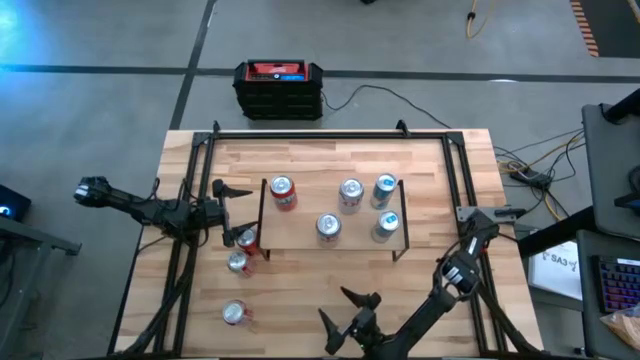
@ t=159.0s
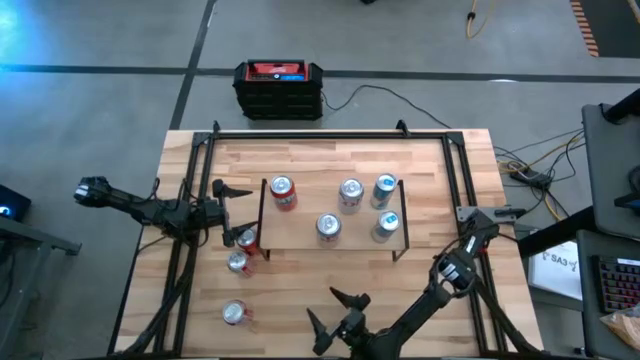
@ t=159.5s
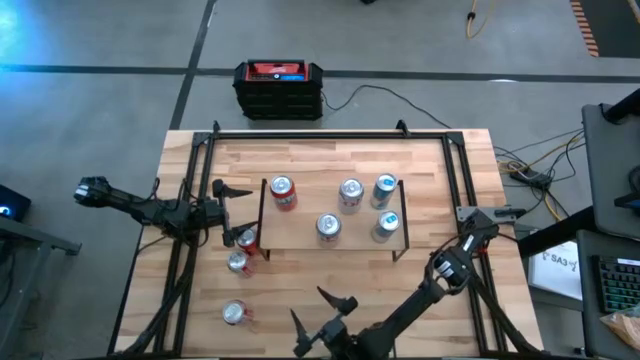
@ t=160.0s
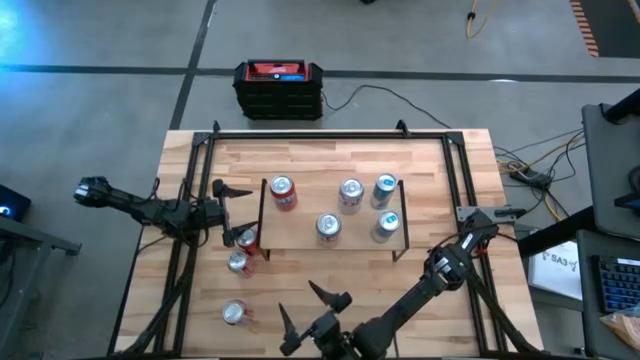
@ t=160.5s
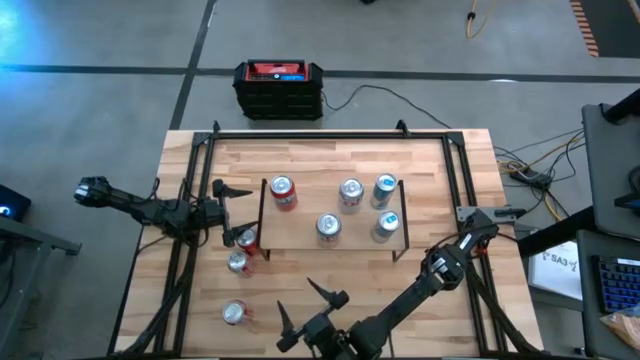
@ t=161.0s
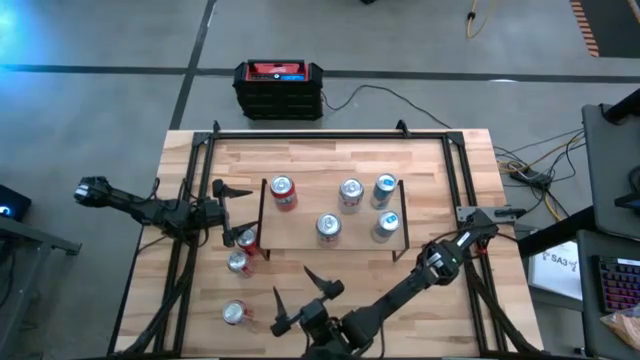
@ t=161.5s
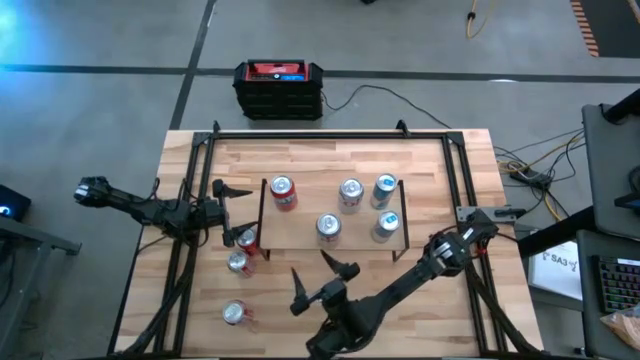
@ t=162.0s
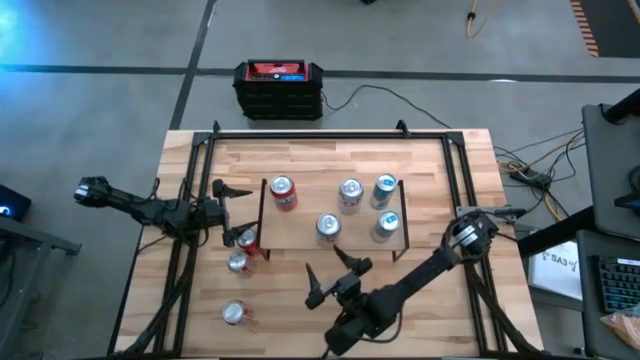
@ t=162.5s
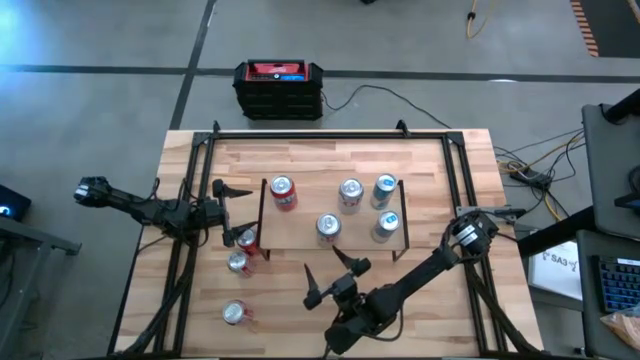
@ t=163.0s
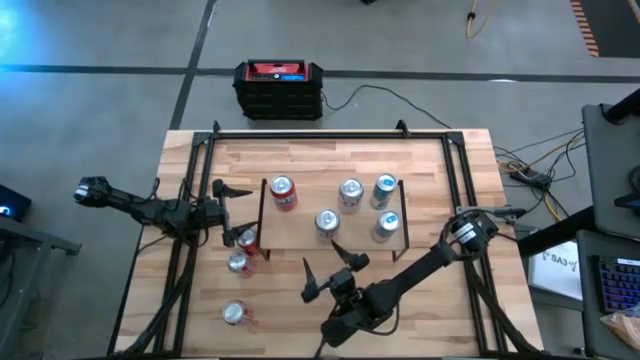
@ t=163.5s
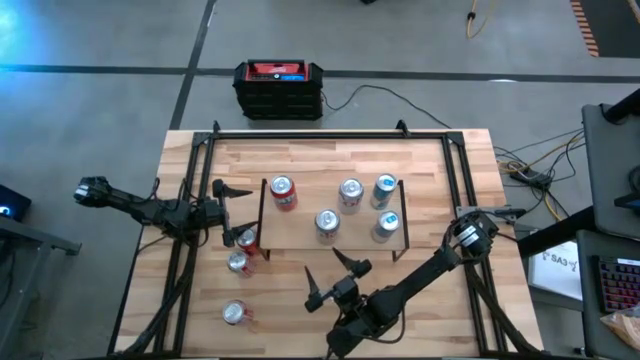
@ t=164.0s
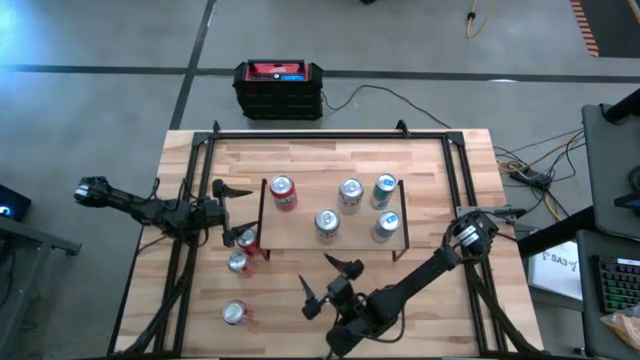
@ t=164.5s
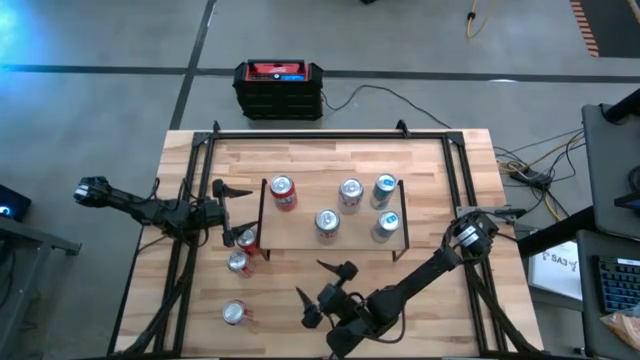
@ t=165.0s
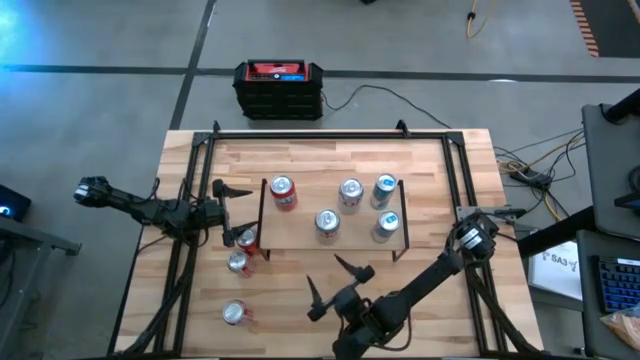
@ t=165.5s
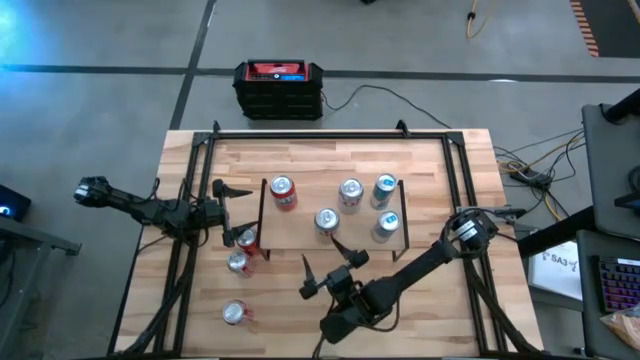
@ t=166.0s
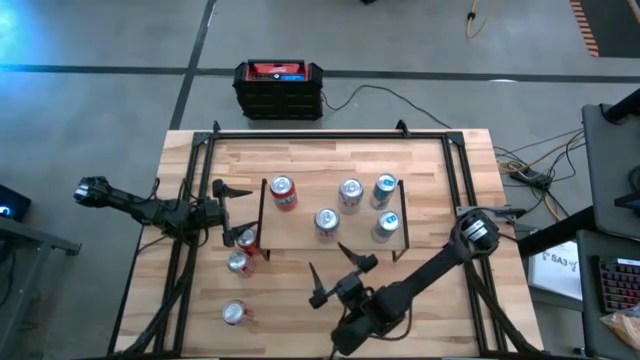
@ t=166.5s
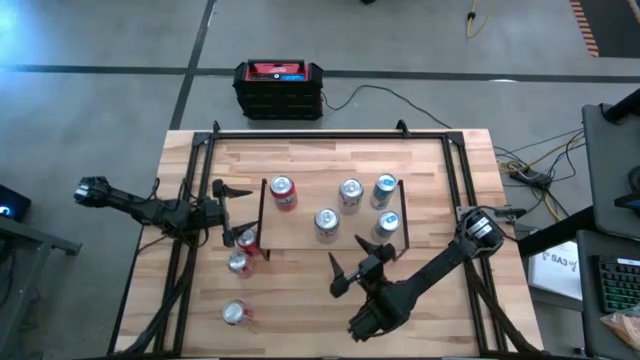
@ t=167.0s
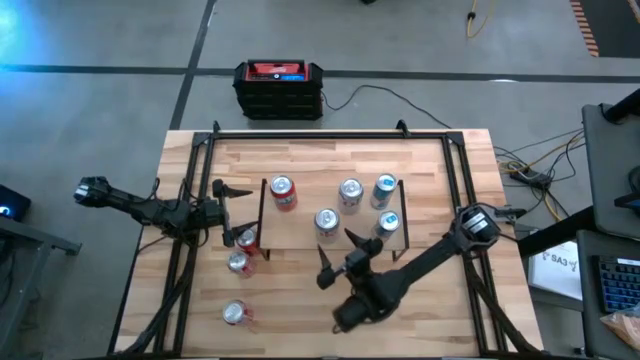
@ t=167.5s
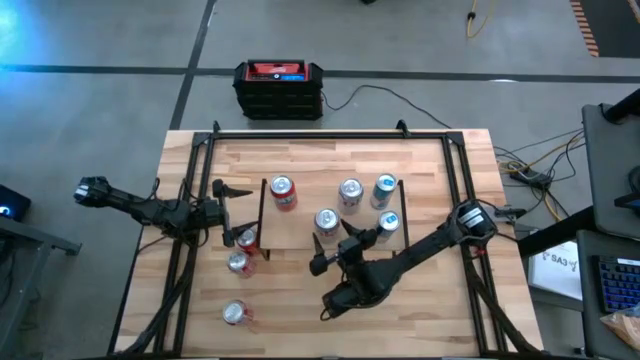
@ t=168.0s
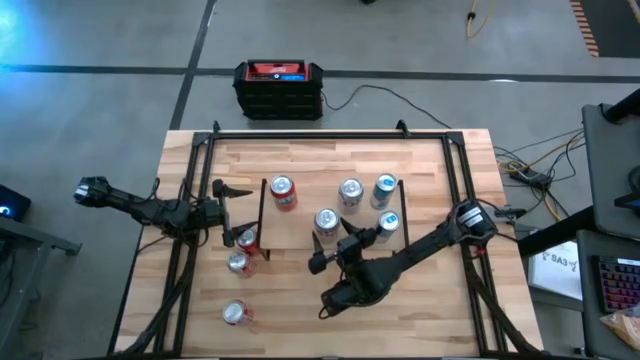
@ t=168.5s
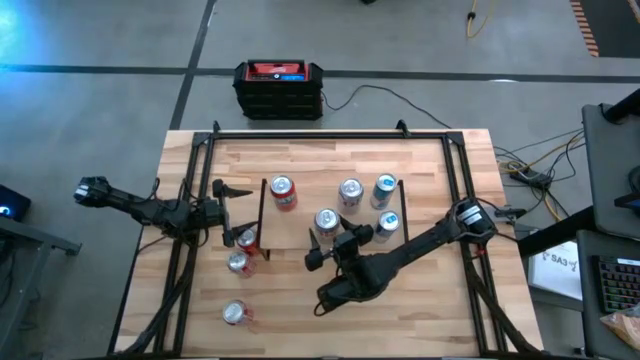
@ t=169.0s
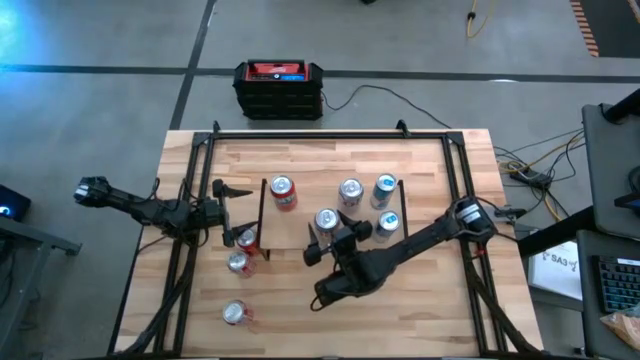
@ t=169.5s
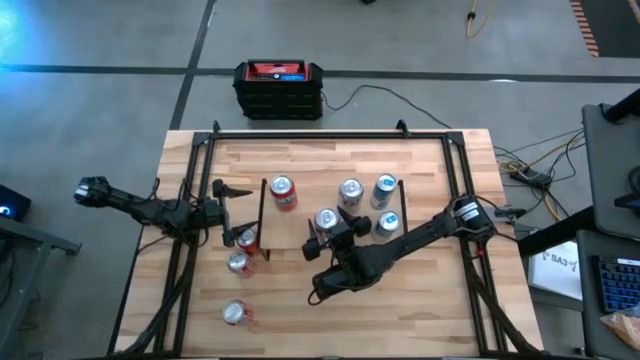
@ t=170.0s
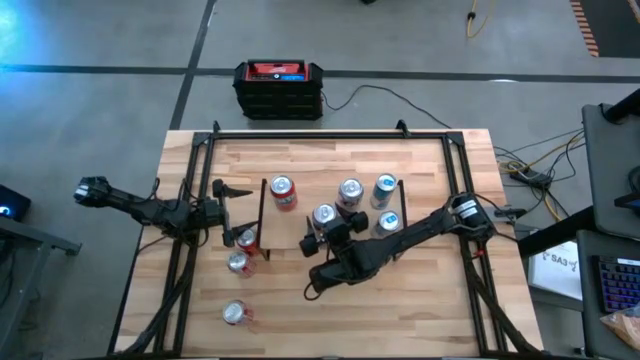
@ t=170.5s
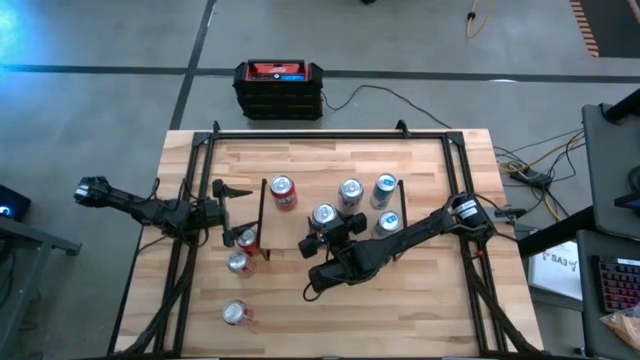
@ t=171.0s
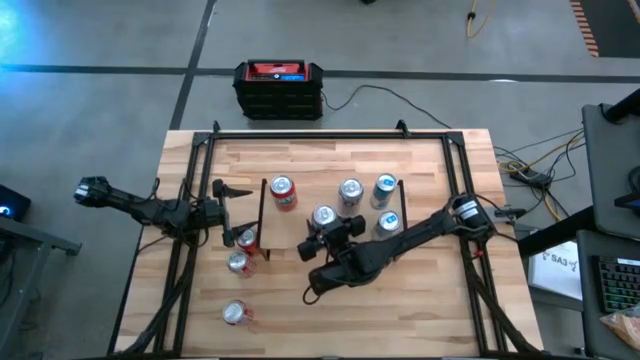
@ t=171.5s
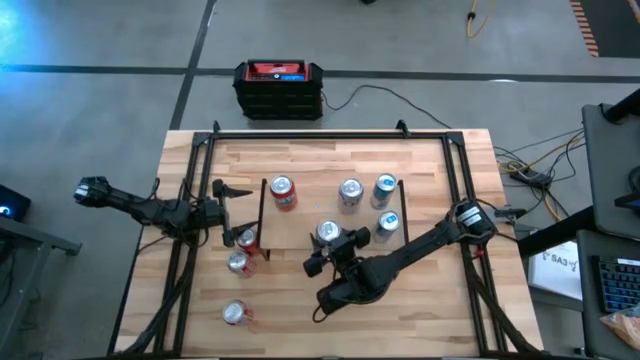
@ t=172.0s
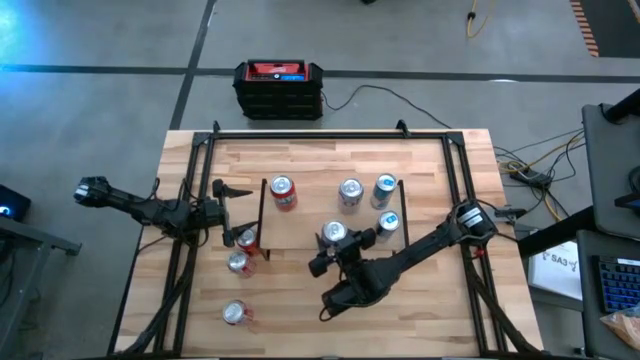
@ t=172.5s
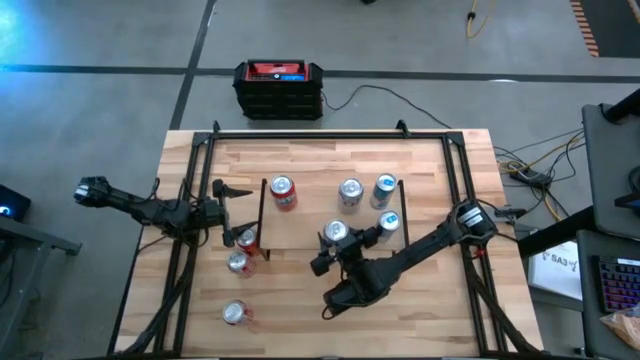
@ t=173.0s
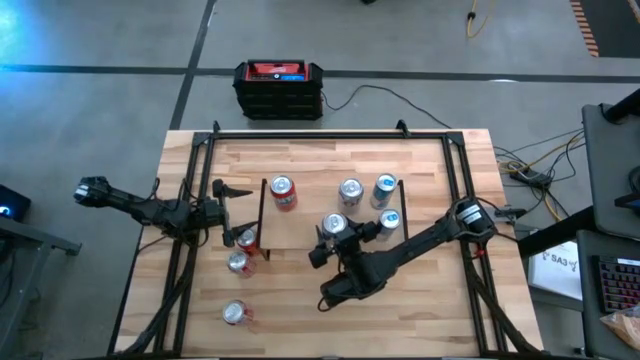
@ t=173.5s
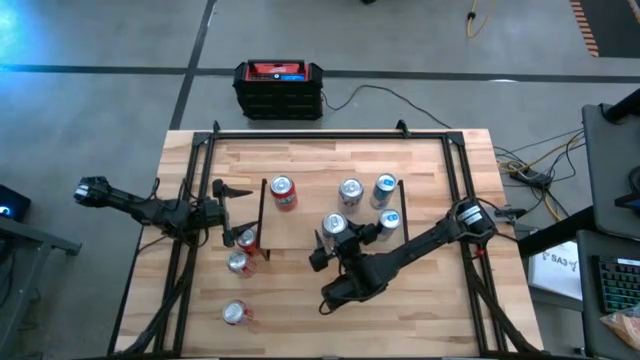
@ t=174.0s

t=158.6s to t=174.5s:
Task: Place canned beverage on shelf
Put the silver red soda can on the shelf aligned with the other silver red soda can

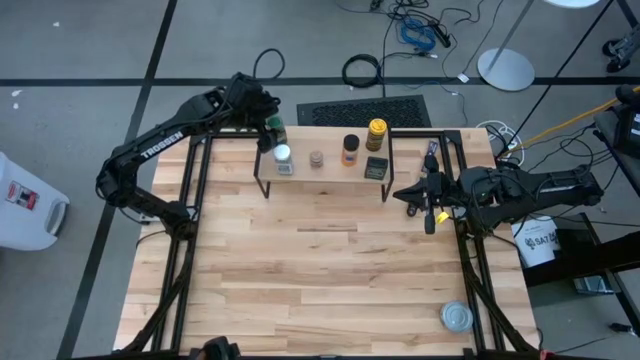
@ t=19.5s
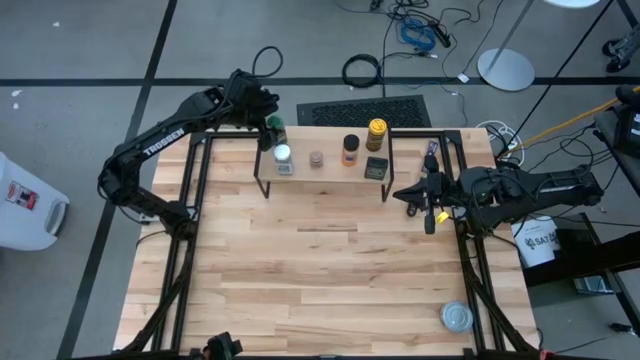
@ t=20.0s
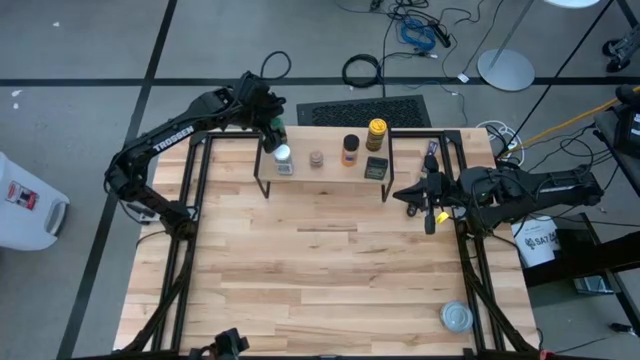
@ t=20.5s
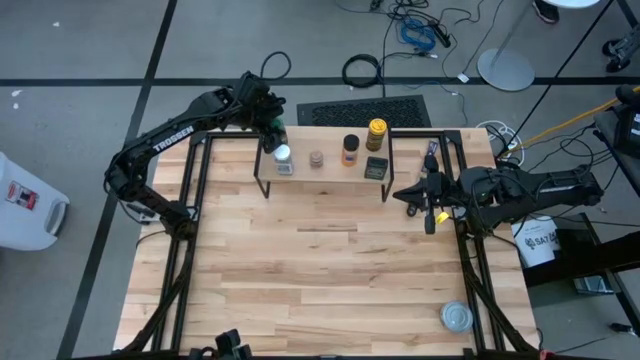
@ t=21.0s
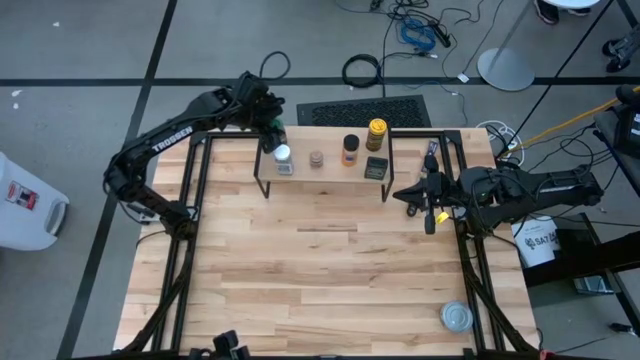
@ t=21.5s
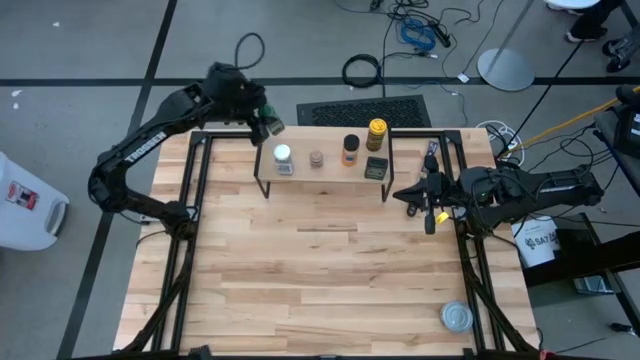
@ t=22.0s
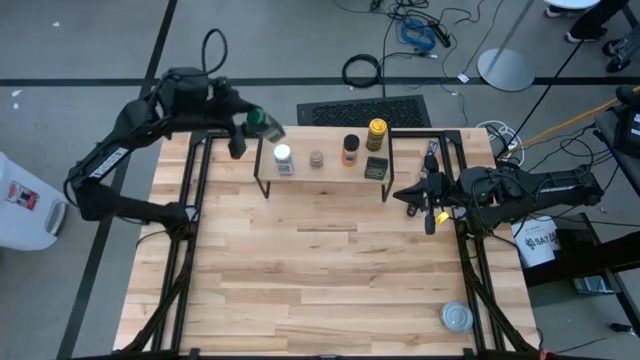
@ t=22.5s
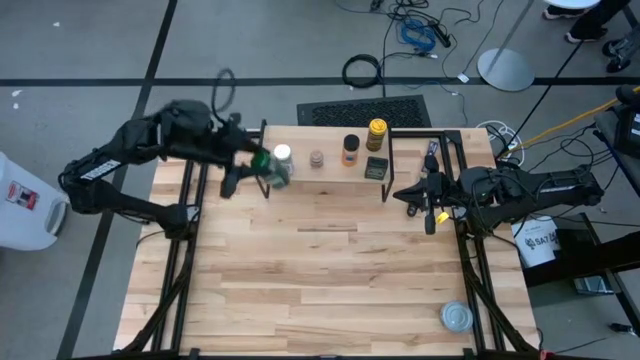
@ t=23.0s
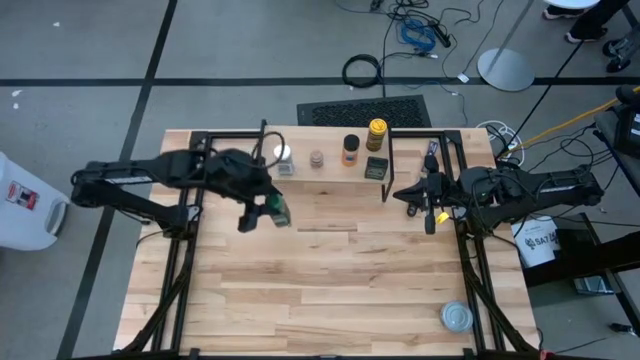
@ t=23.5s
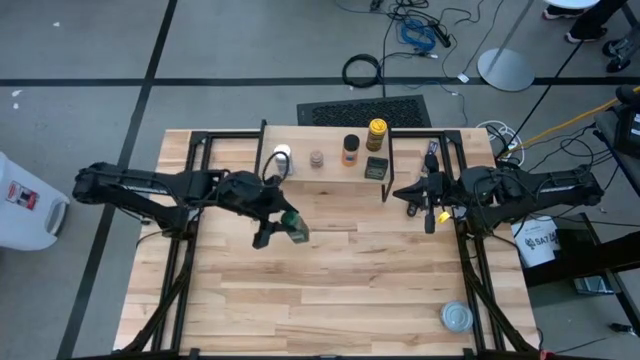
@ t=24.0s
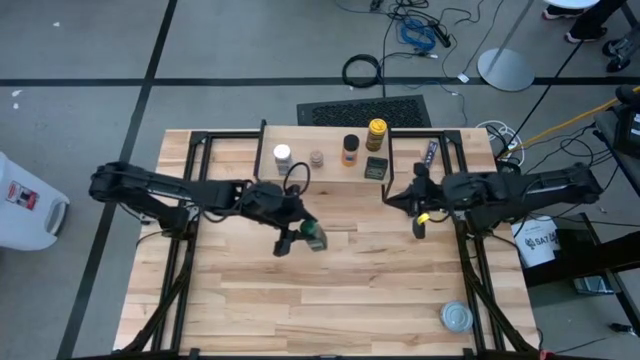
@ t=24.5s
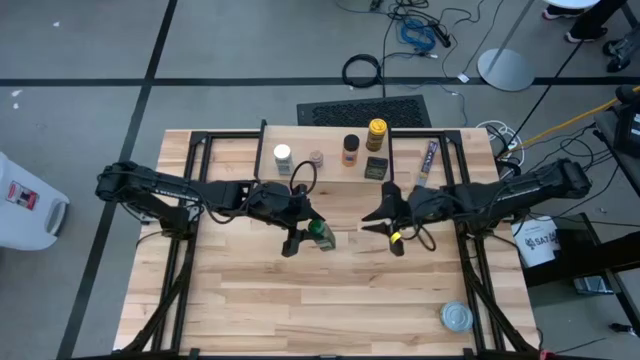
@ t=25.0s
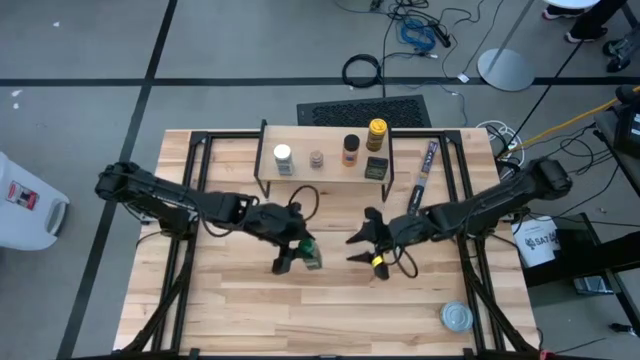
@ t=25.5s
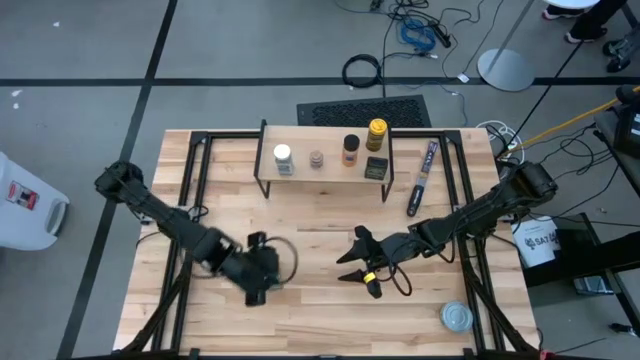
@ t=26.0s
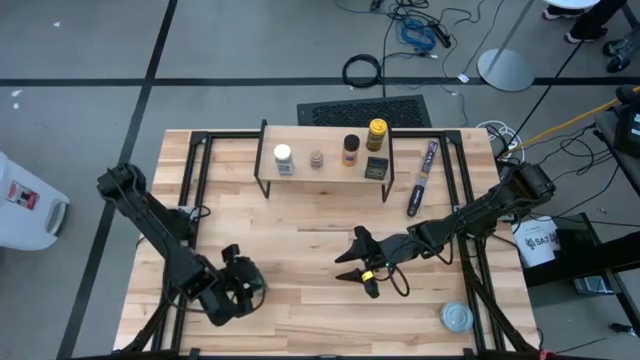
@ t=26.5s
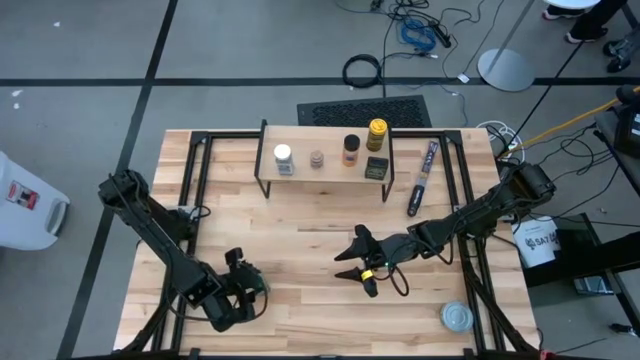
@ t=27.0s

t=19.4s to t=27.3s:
Task: Shelf spices
Remove the green seasoning bottle from the shelf
